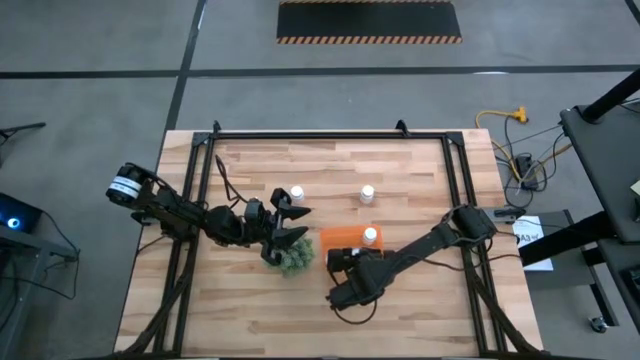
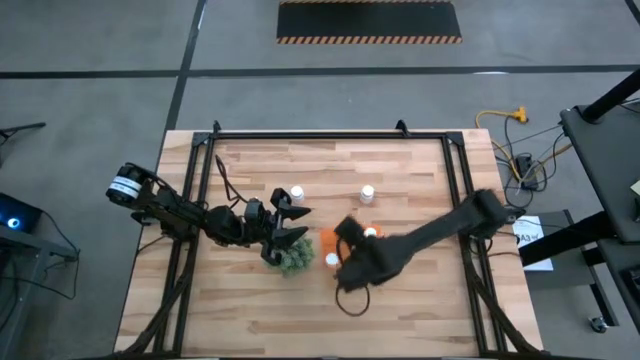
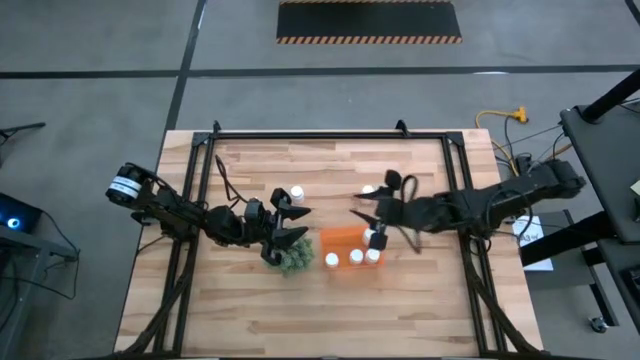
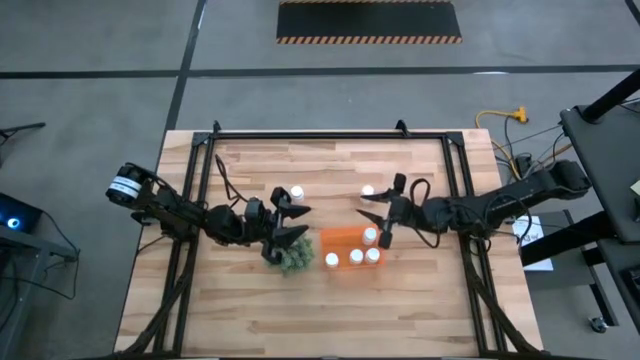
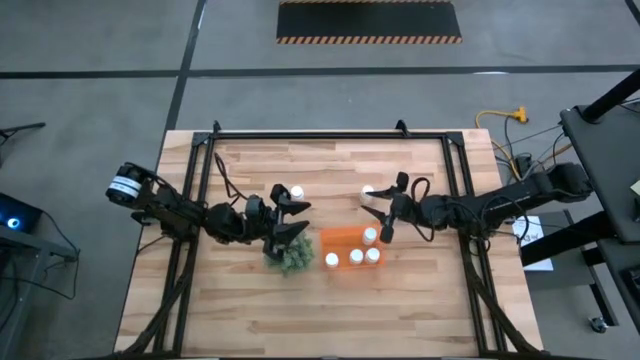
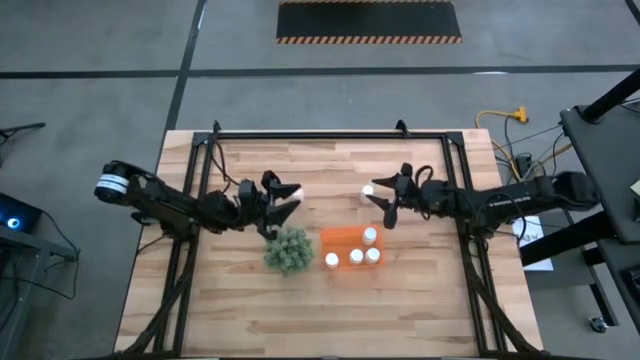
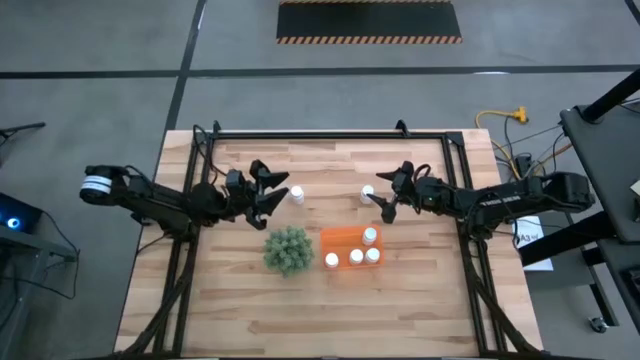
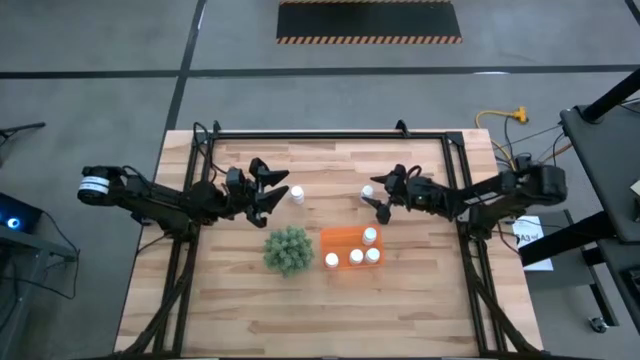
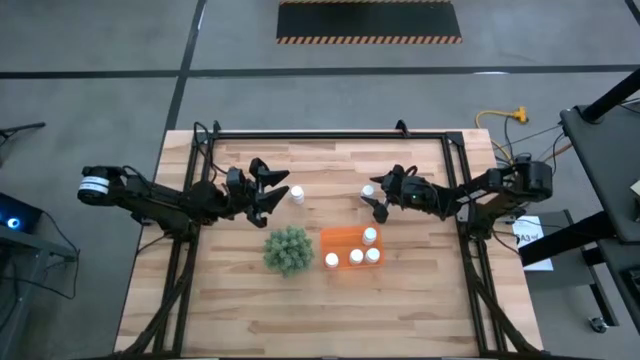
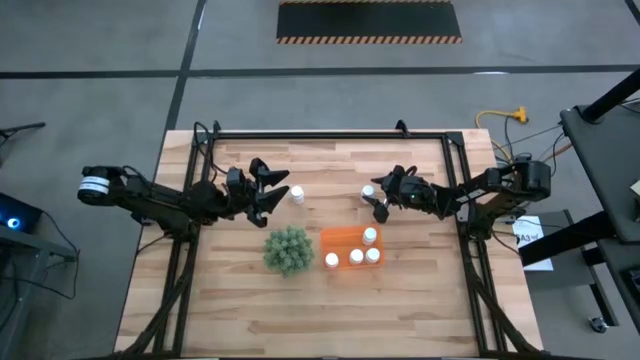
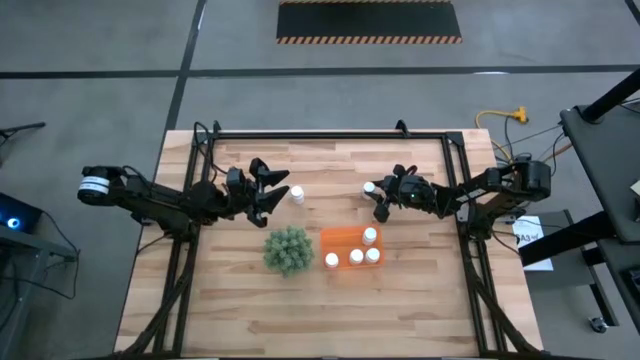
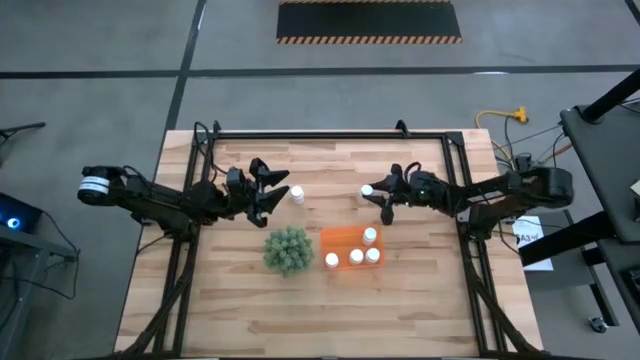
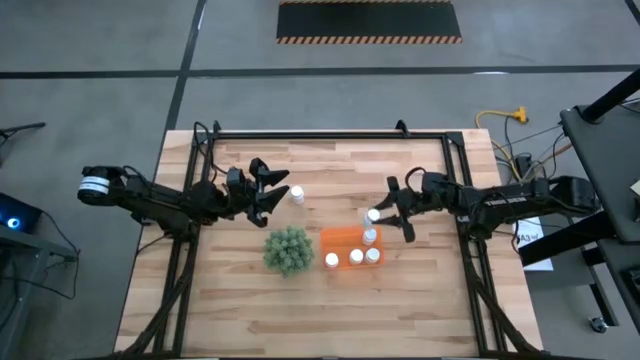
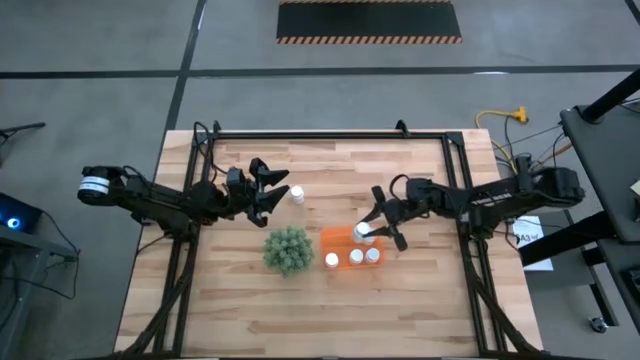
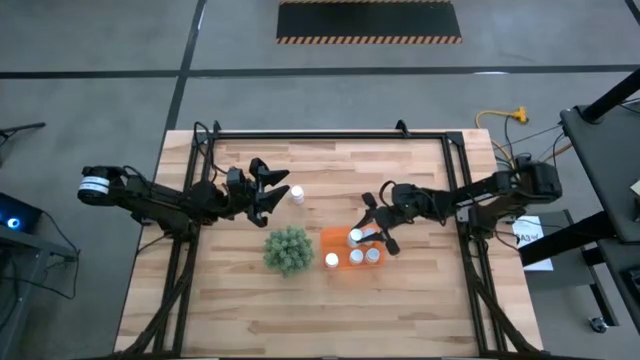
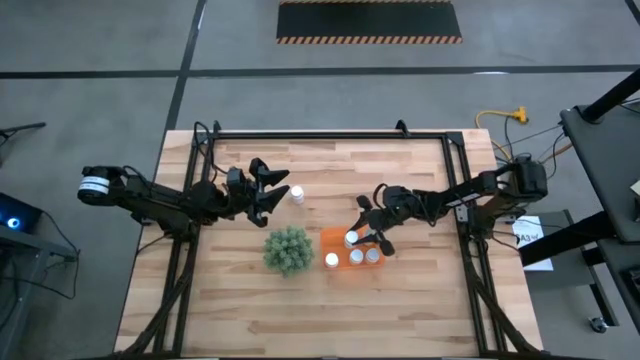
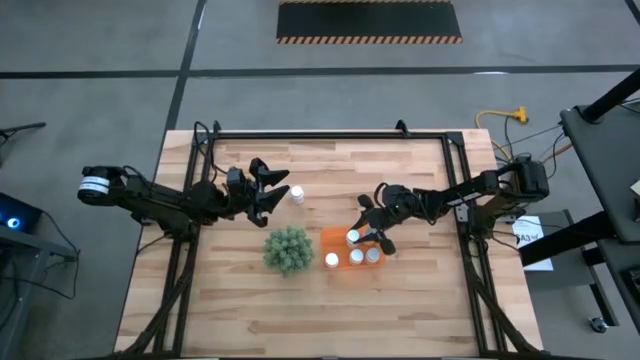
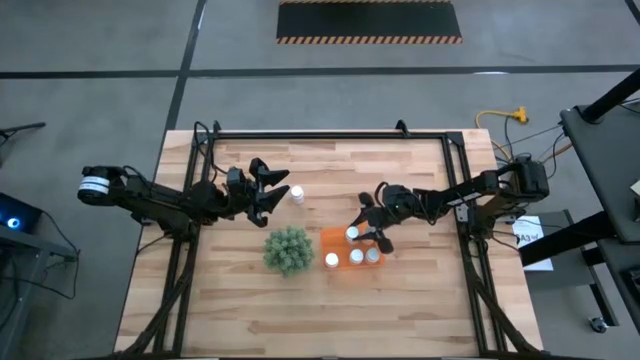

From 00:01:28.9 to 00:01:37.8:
Task: Pick and place pill bottles into a basket
Put the white pill bottle into the orange bin

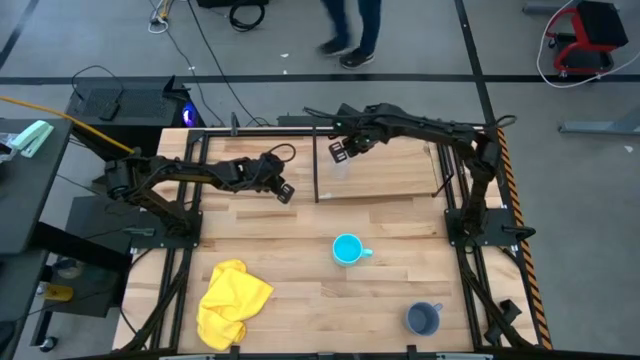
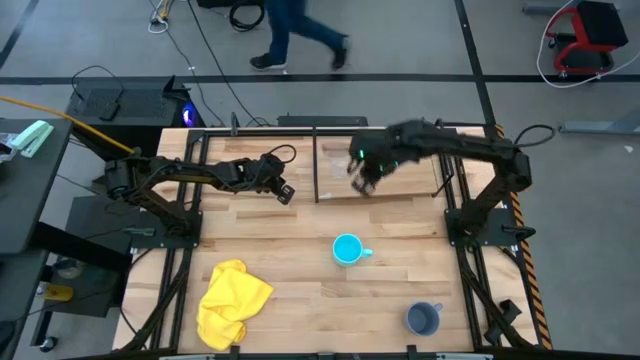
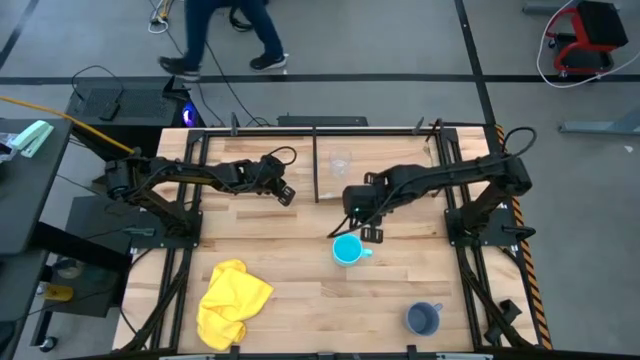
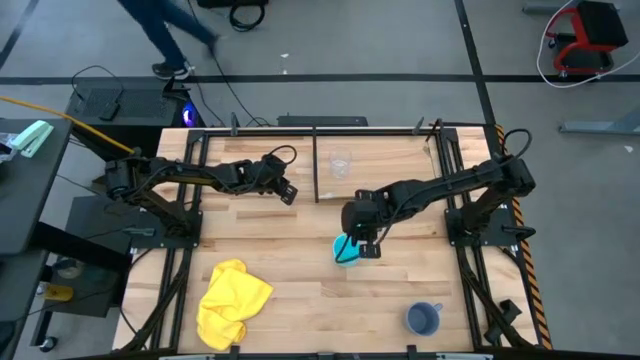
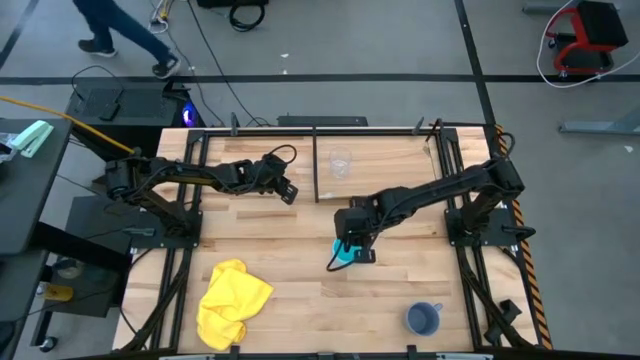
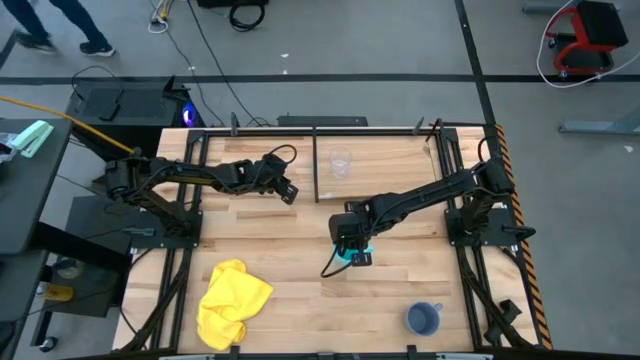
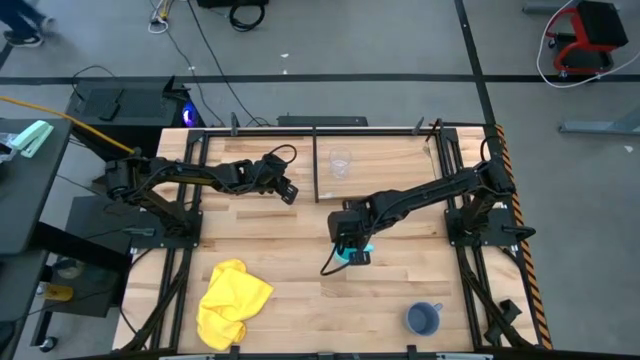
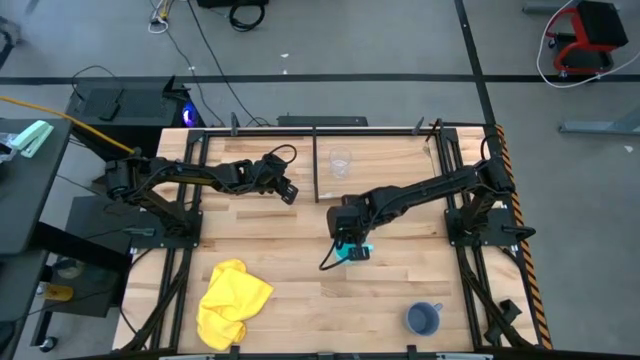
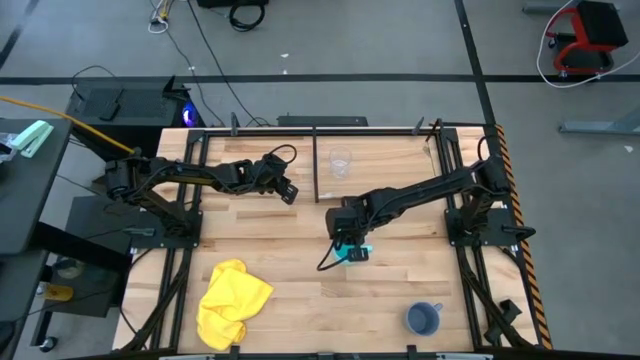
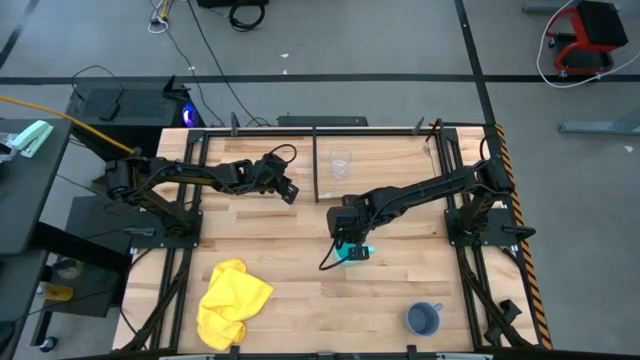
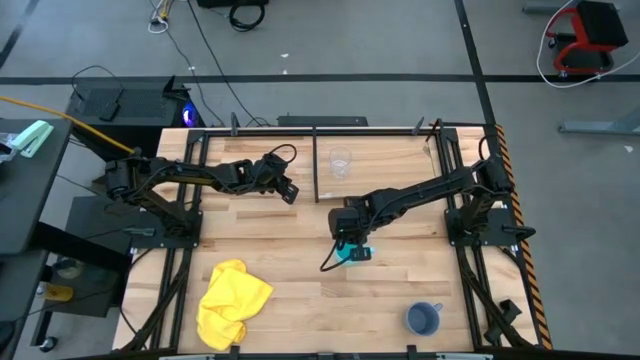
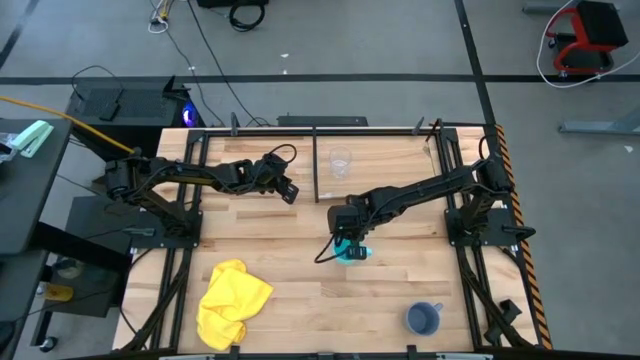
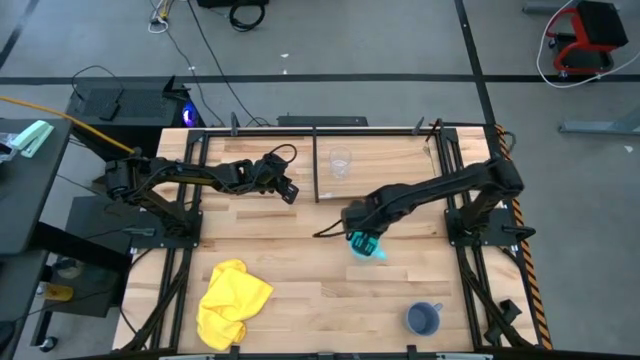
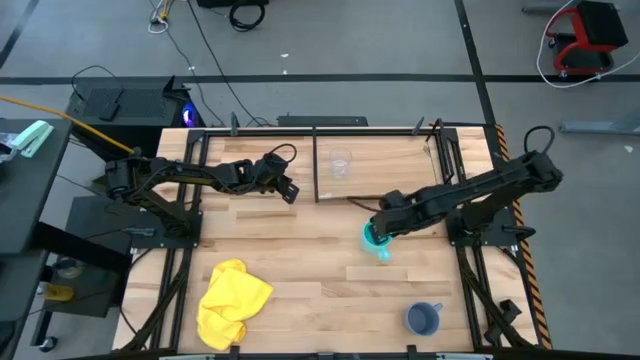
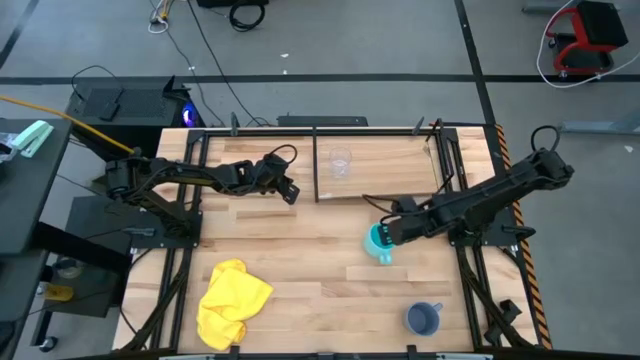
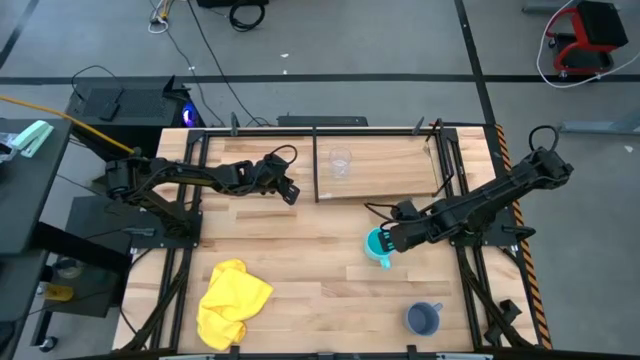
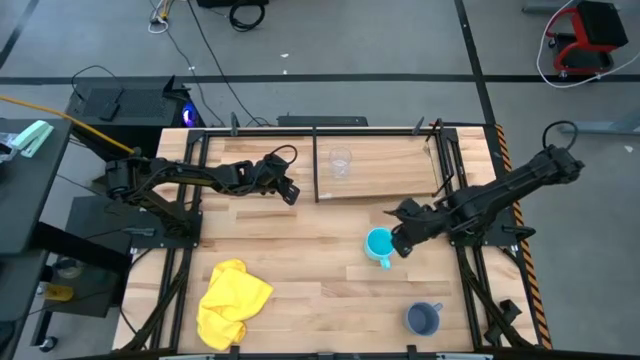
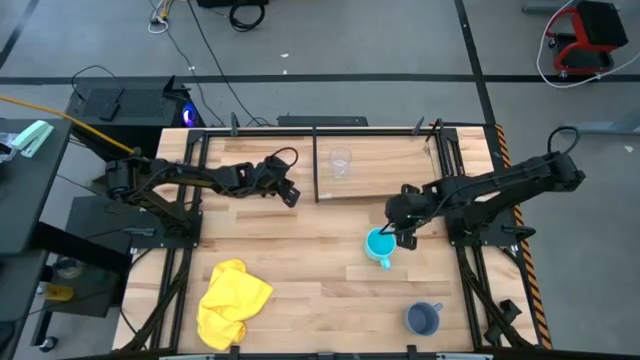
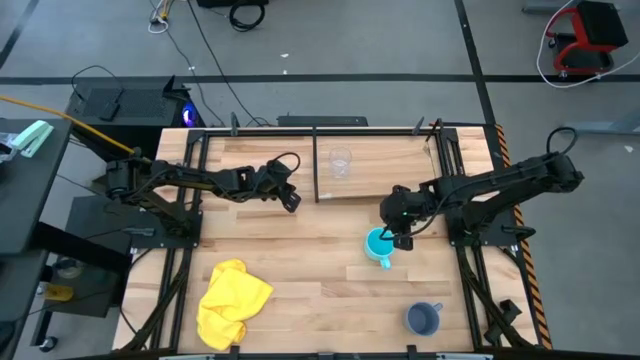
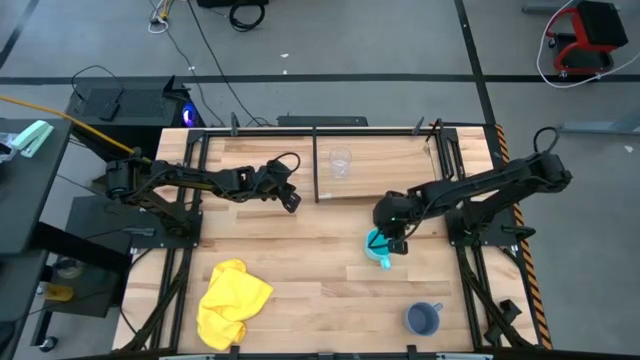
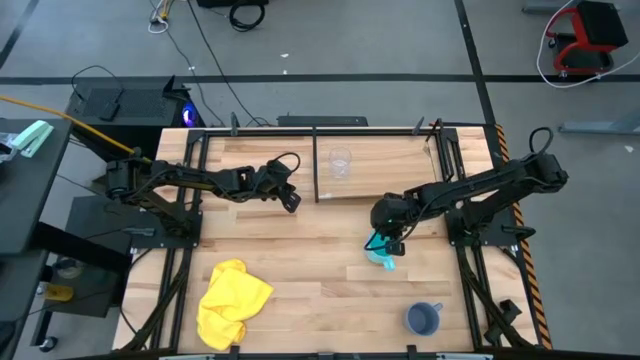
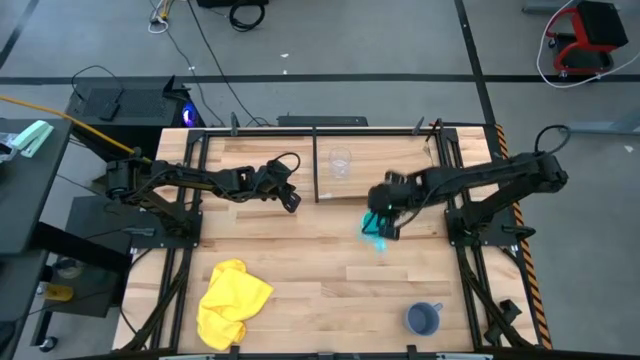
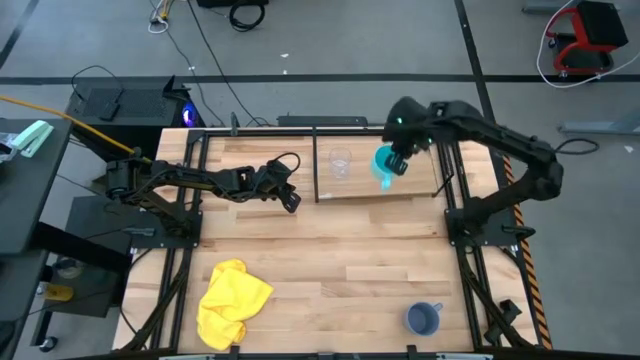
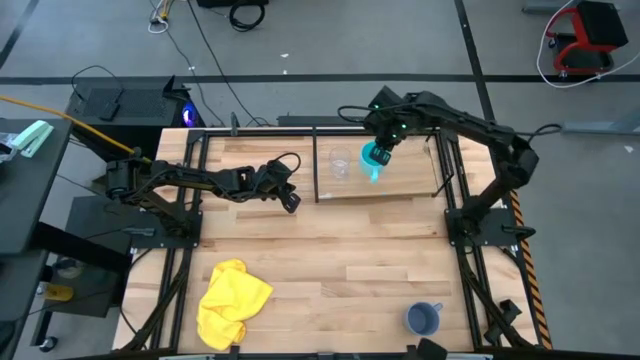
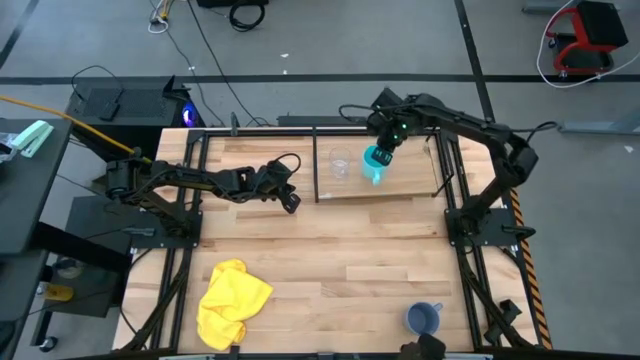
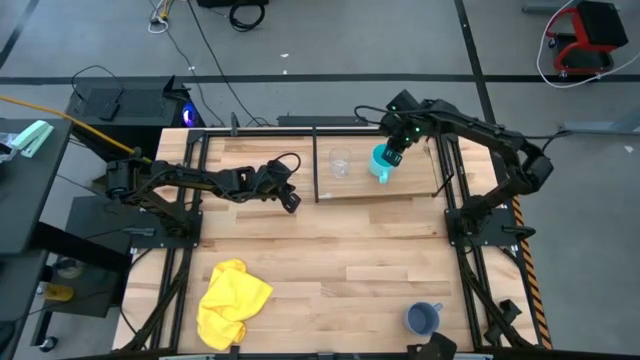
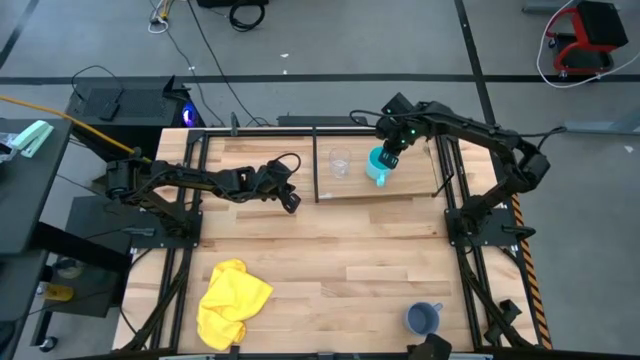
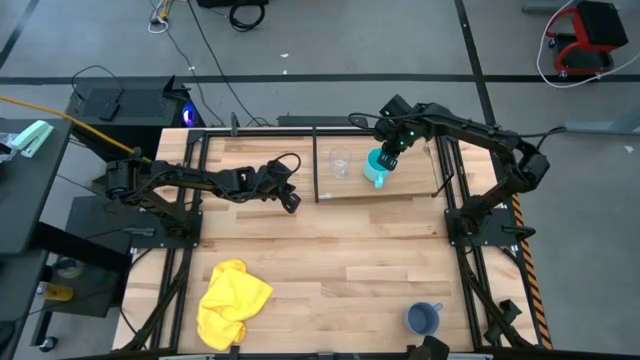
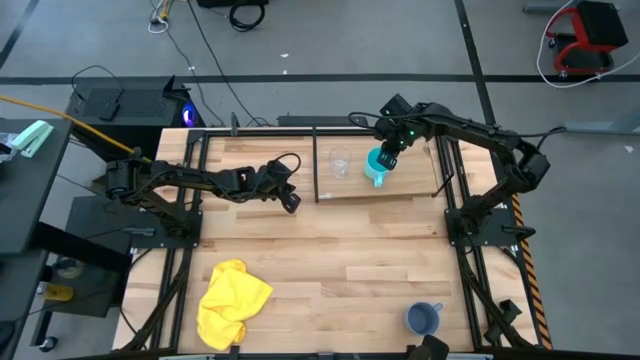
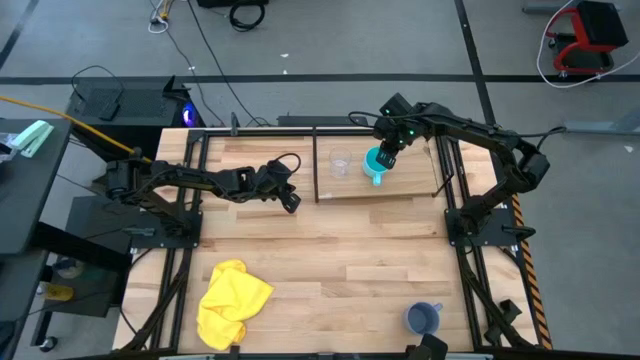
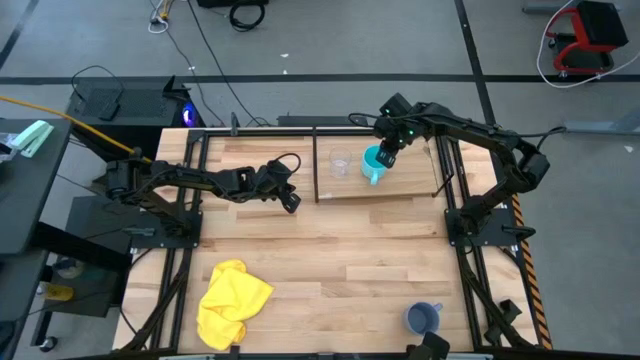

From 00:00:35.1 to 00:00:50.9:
Task: Stack small to large cups/mugs on shelf
Put the light blue mug on the shelf
